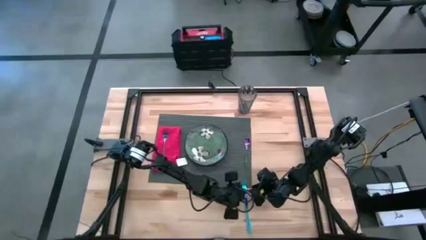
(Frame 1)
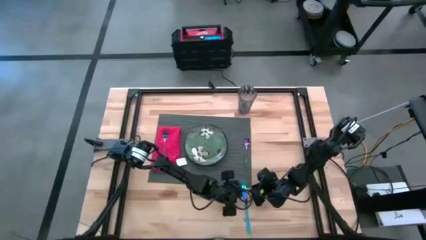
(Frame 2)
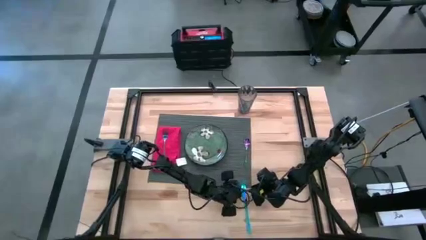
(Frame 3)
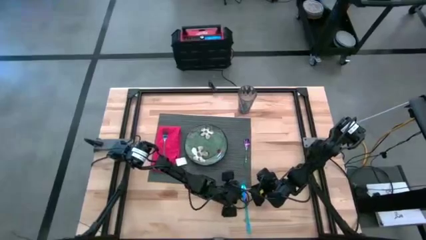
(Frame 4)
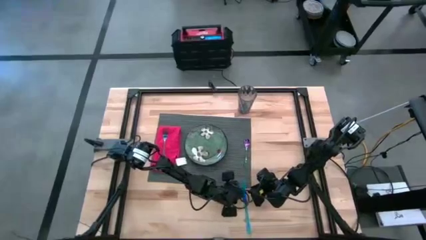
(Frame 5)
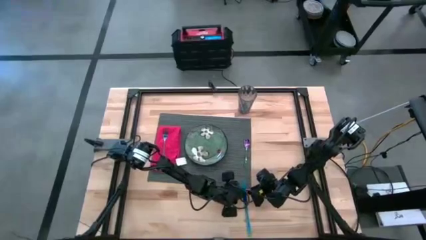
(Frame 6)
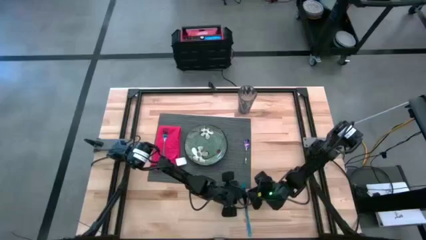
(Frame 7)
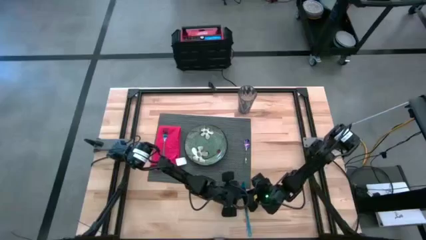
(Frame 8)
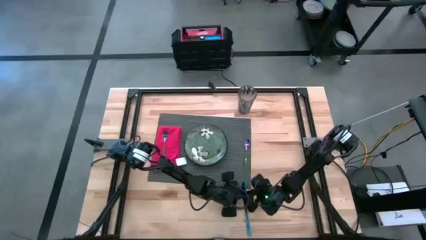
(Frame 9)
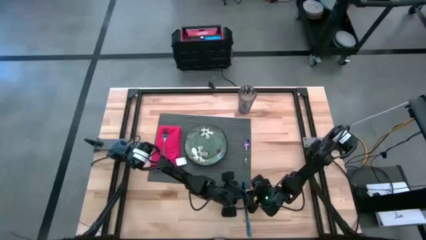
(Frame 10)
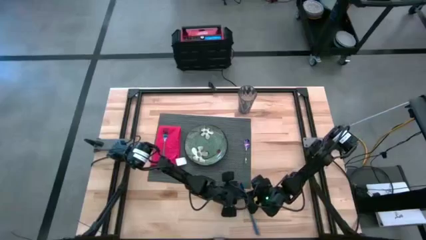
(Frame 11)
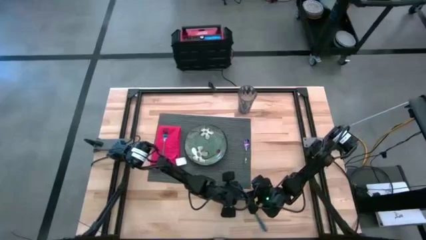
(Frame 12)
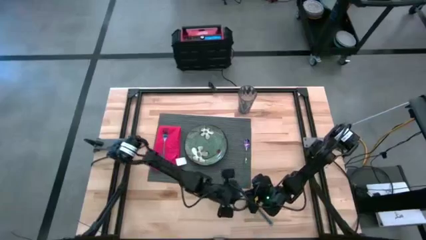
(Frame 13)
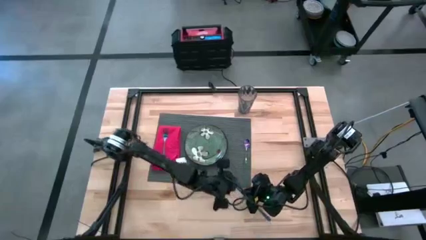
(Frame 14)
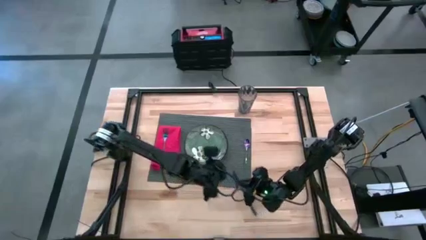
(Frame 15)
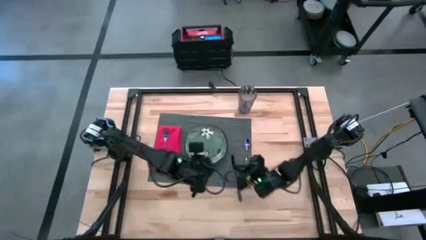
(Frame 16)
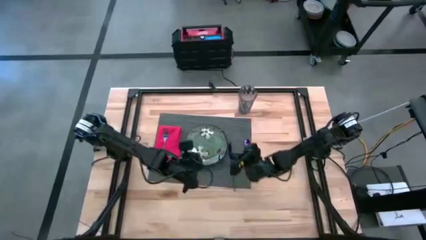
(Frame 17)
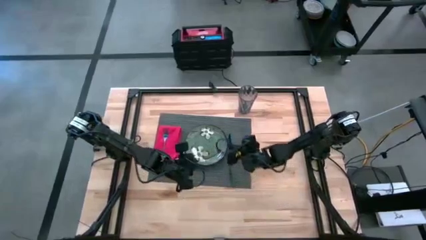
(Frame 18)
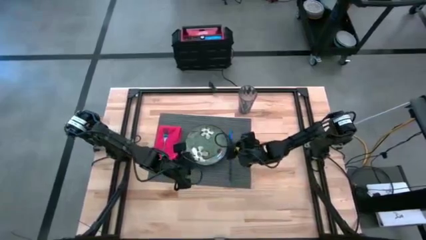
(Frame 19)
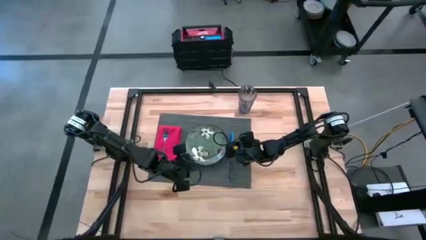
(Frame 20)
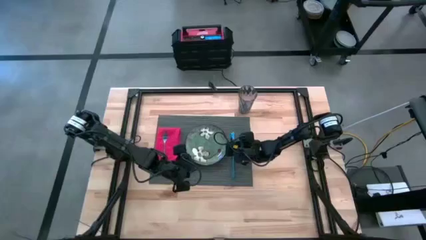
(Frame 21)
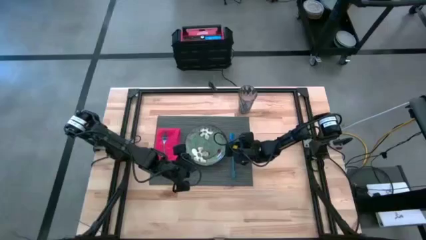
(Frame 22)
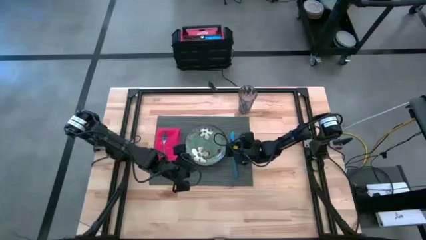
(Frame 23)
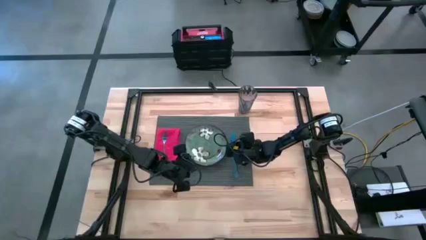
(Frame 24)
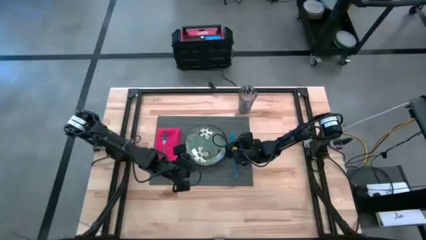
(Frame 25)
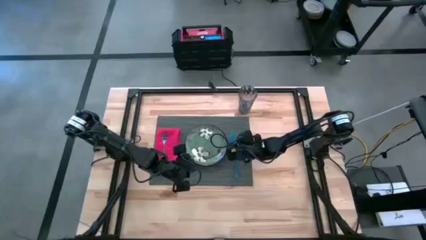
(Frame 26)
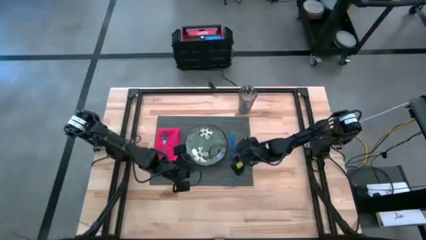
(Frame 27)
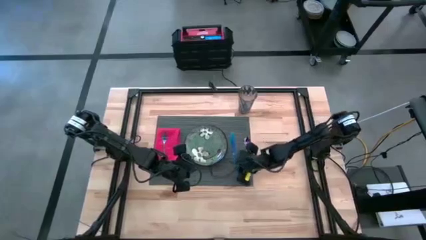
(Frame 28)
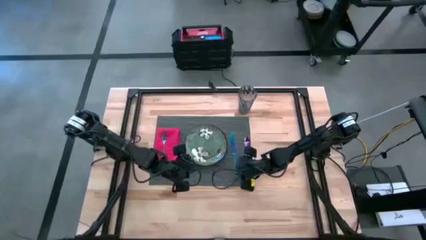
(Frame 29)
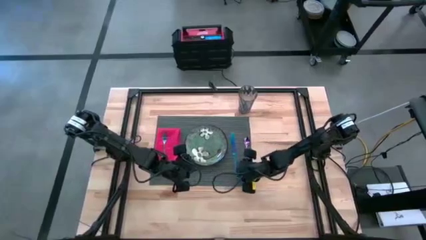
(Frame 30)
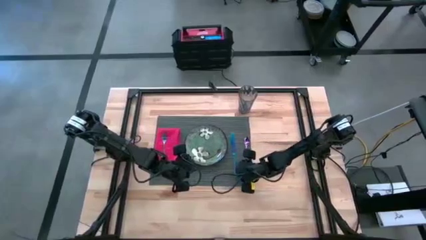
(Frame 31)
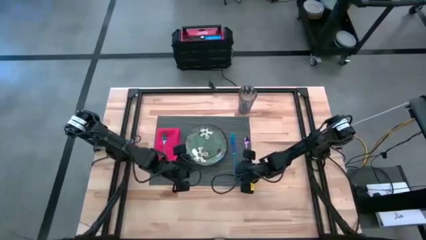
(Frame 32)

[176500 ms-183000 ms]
Task: Set table place
Put the blue table knife on the gray table mat to the left of the blue spoon

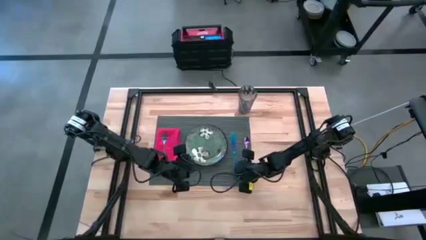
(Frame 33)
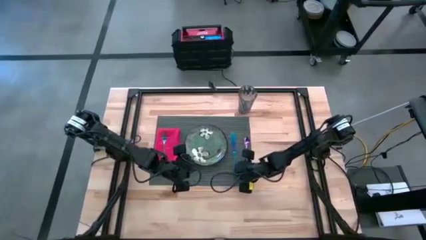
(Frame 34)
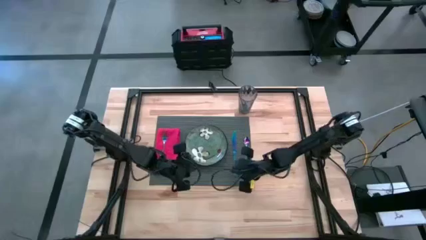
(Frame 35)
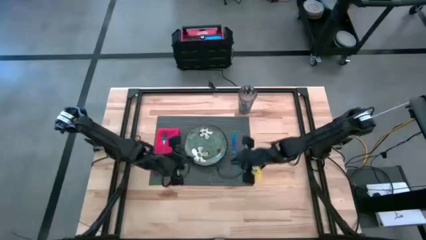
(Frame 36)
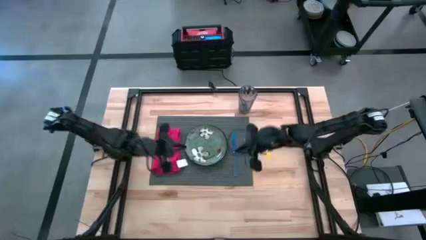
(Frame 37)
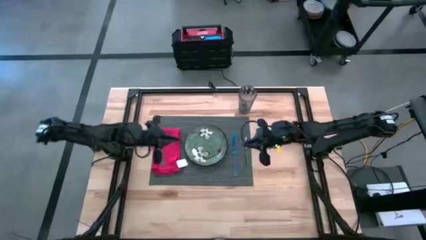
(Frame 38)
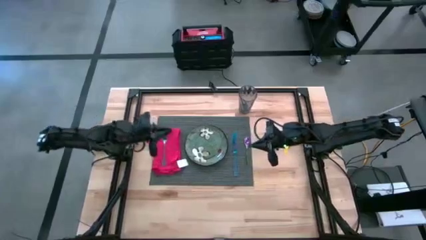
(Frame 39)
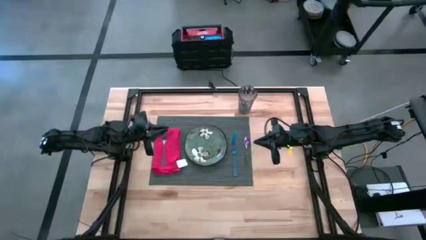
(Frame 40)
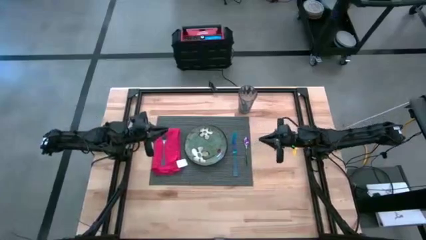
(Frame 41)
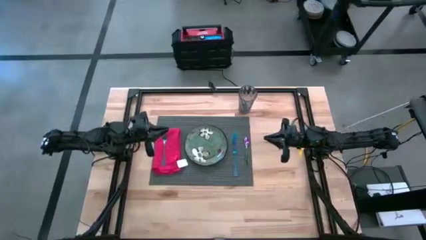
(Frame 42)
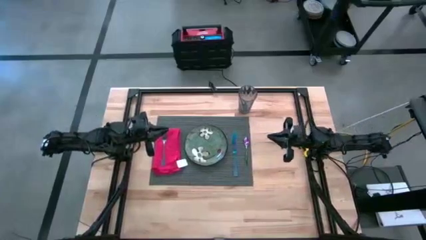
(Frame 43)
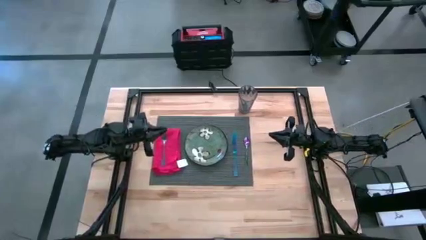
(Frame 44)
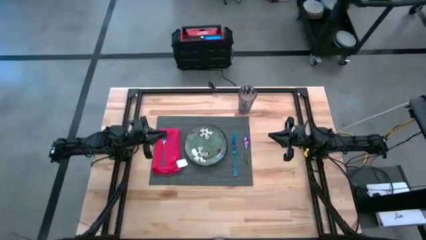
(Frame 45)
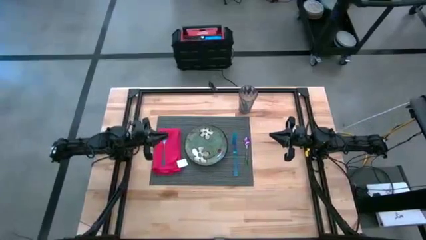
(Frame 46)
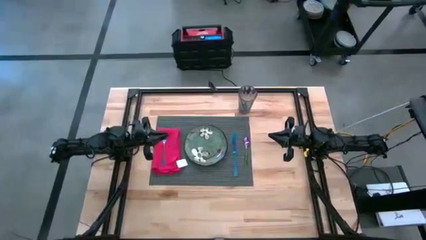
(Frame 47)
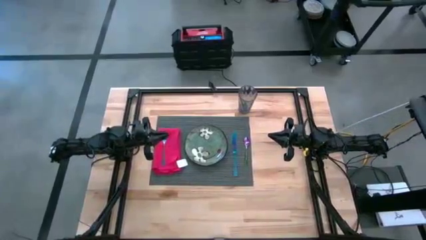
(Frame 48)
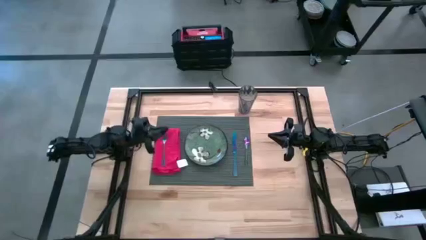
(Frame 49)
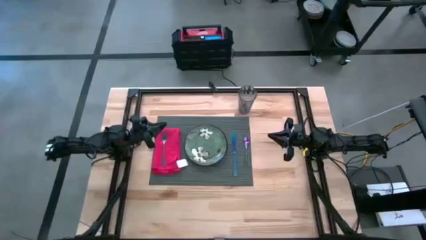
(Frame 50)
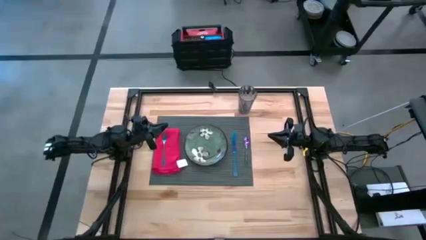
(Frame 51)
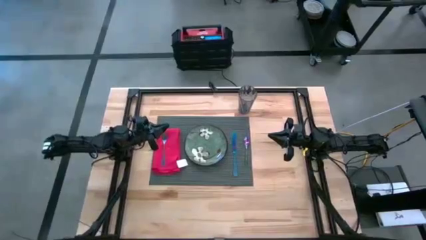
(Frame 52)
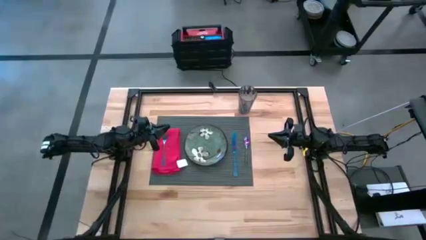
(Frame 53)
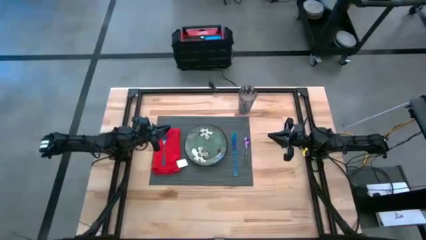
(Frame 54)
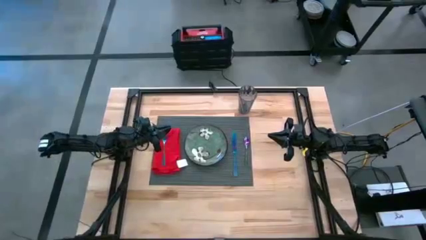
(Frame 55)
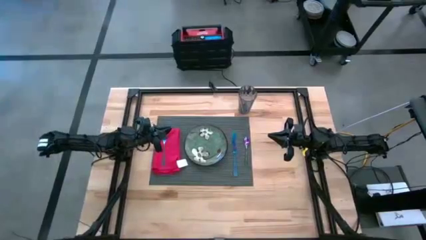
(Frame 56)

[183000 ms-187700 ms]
Return to Home Position

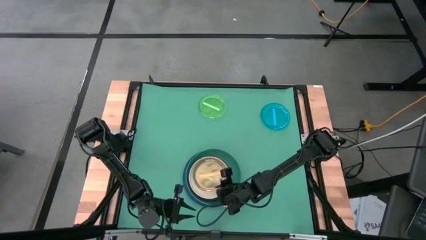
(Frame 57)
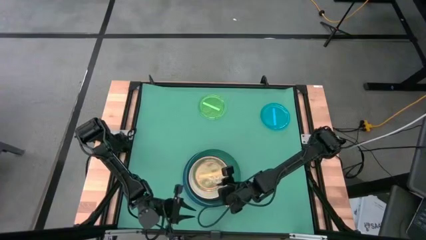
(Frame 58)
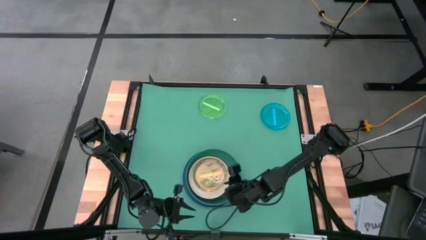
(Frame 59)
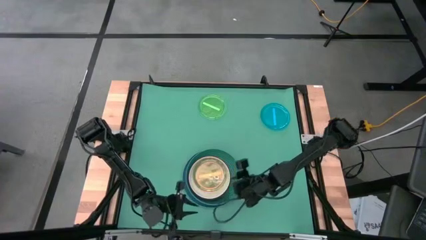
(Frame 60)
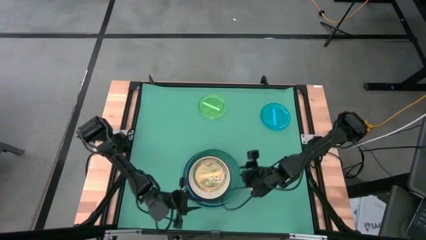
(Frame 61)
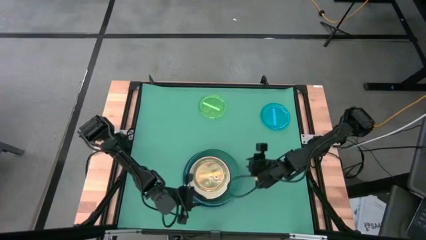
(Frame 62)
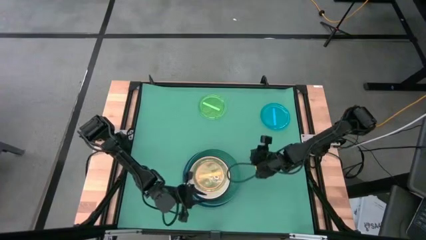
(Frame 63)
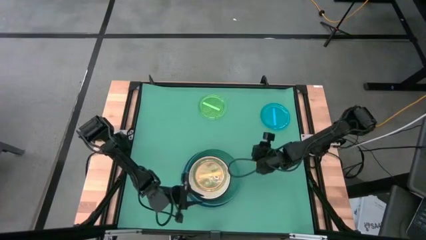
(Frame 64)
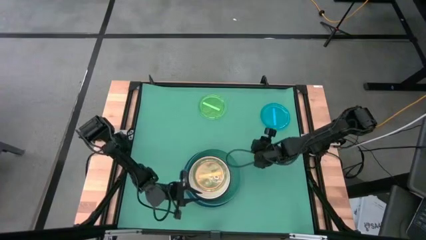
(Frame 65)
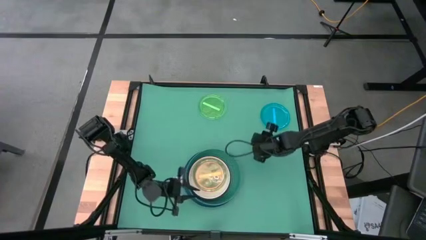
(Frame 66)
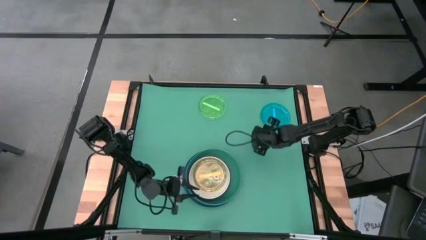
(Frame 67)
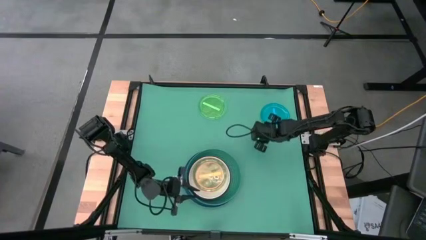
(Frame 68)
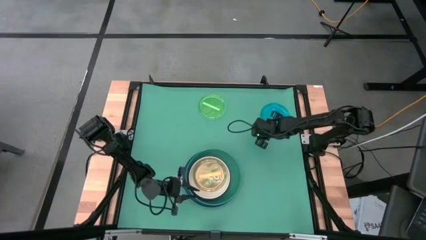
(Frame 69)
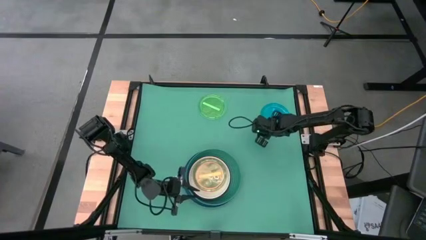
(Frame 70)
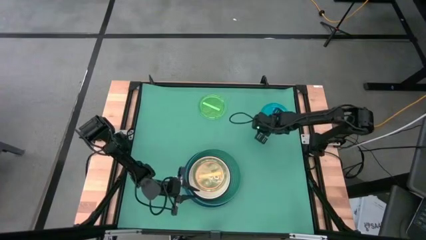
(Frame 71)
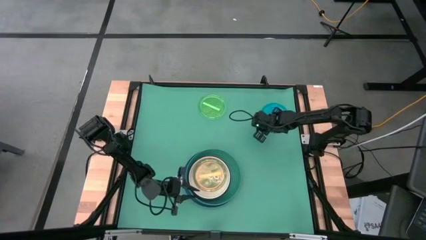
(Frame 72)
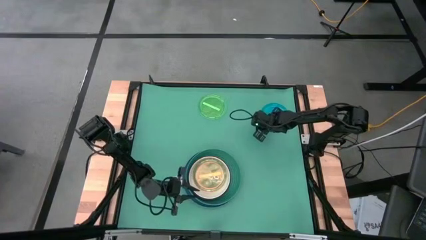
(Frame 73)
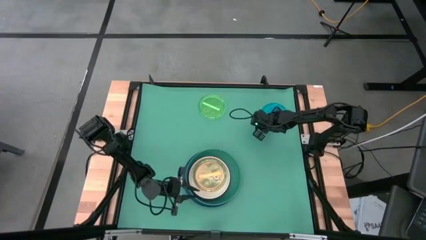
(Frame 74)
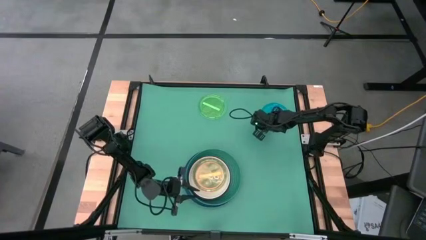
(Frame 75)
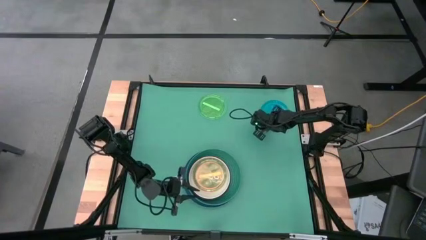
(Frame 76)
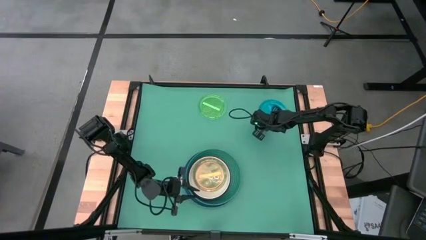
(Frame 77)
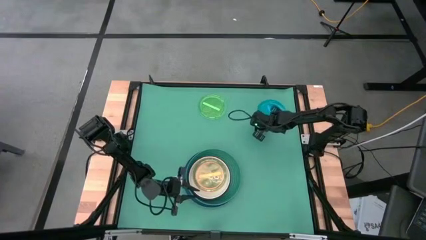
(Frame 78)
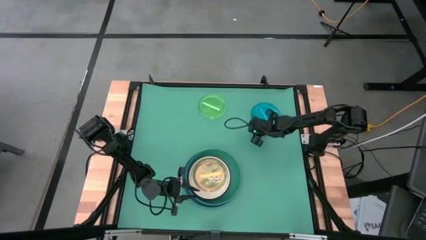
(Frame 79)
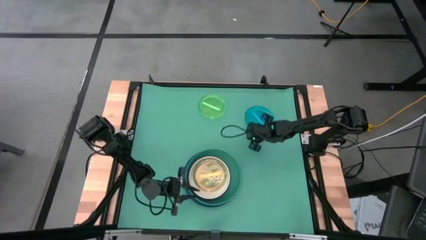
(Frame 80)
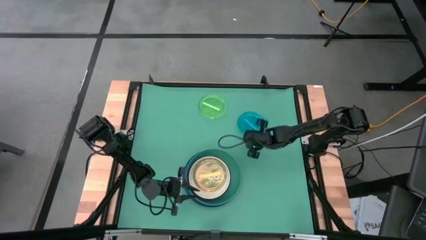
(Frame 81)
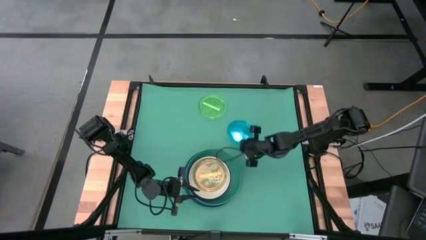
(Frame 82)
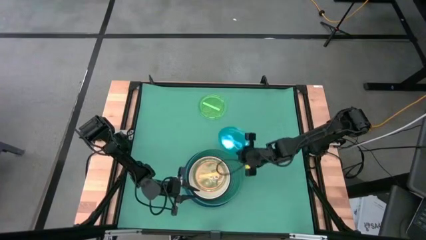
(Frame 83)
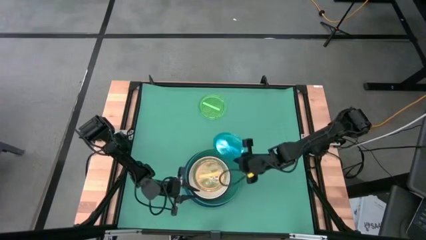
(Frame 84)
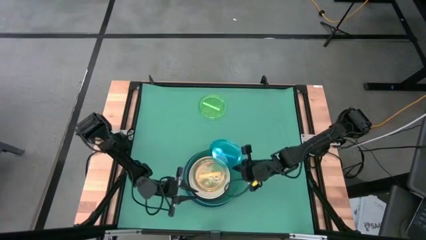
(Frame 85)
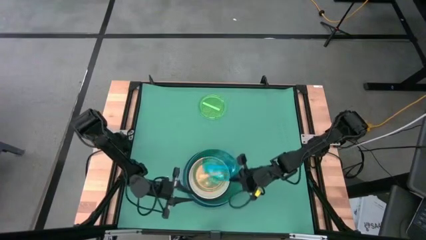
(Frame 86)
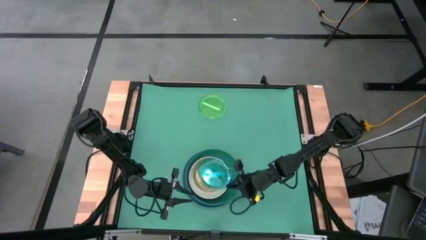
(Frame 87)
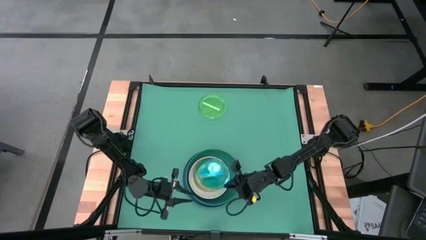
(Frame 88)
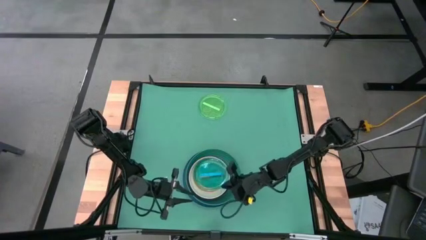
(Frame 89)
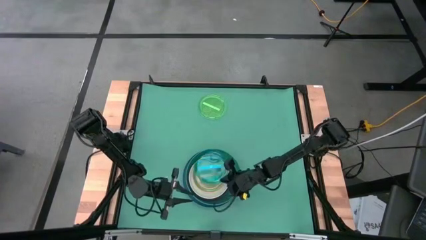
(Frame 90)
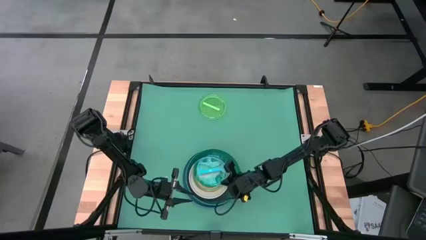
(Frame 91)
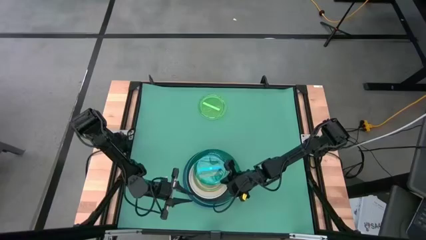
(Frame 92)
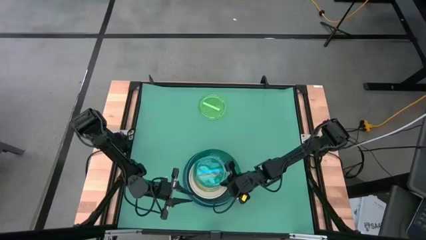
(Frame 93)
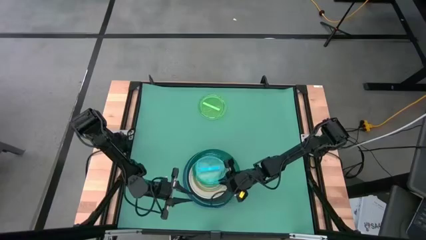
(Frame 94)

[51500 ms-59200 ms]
Task: Stack plastic plates
Stack the blue transparent plate on top of the orange transparent plate
